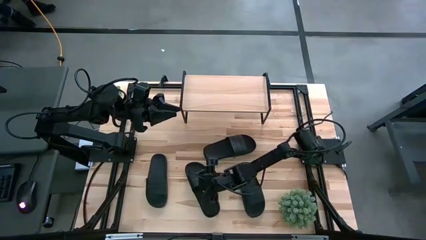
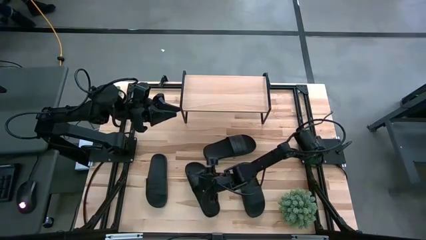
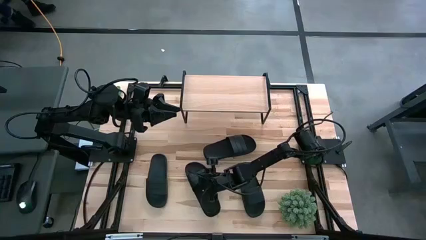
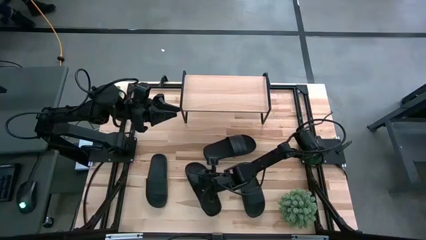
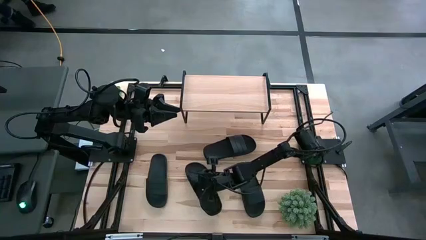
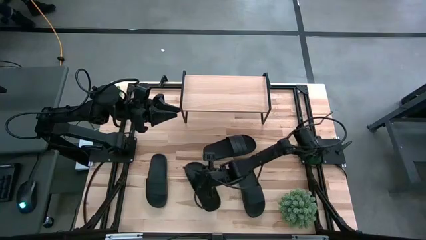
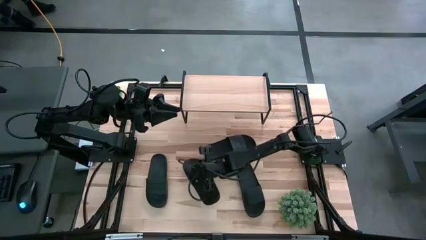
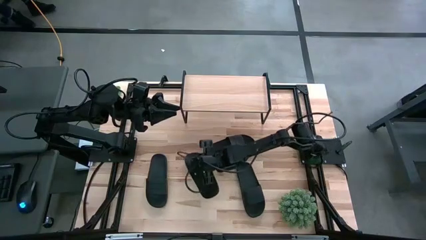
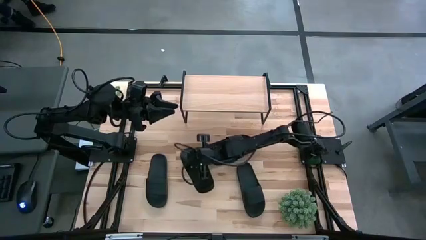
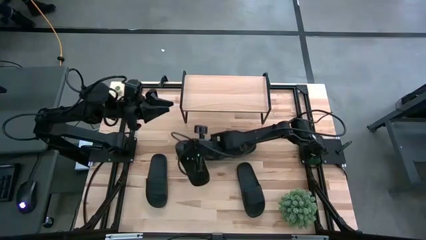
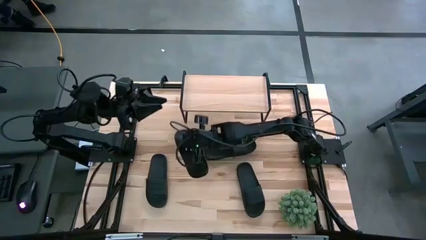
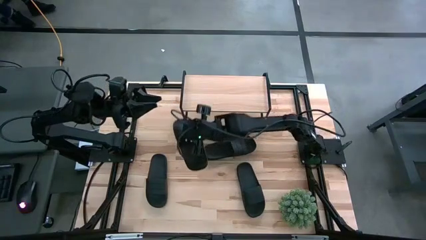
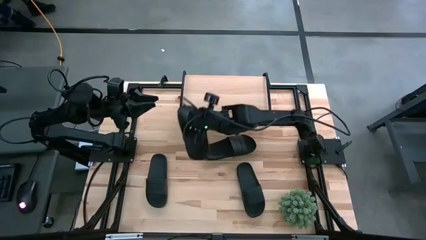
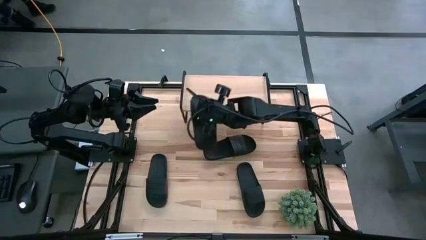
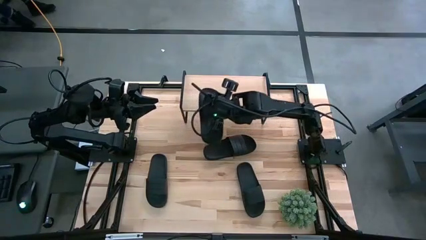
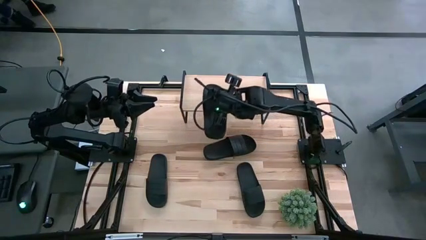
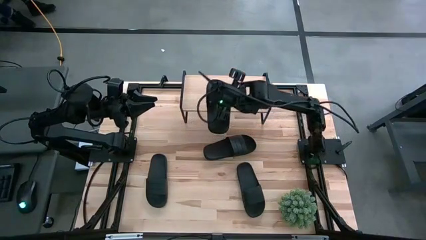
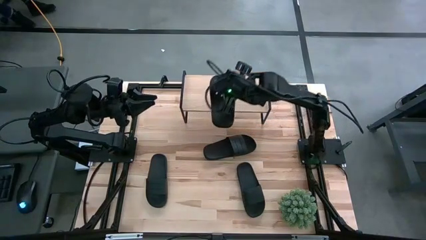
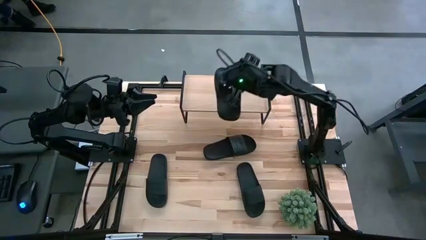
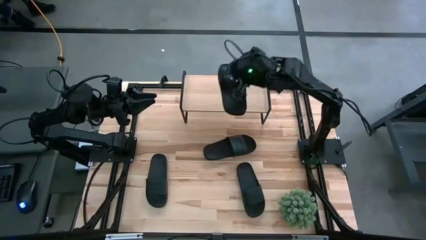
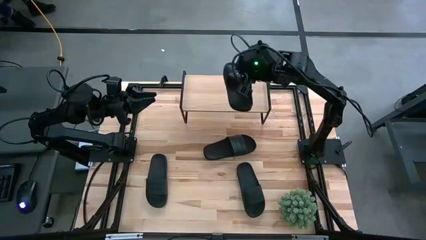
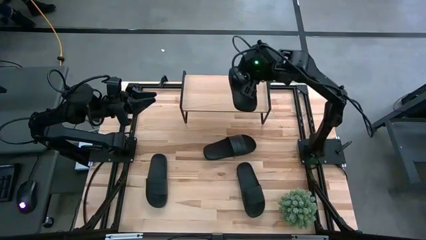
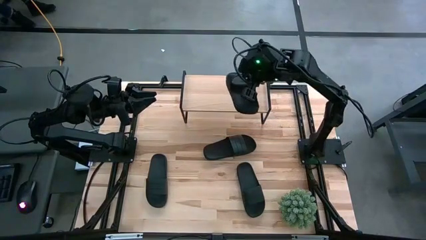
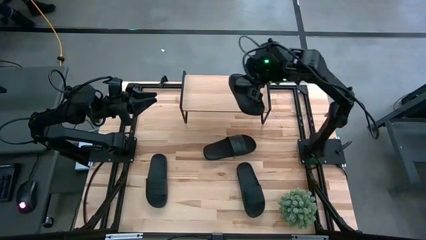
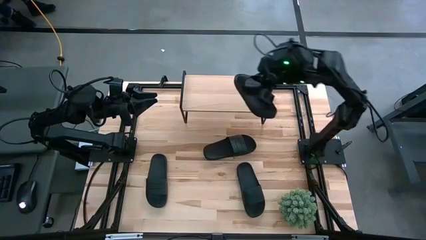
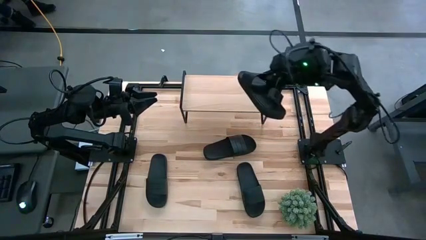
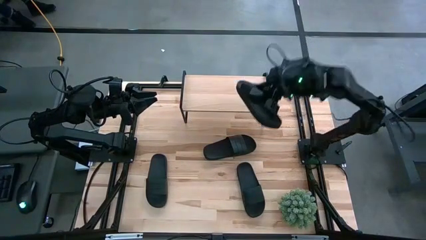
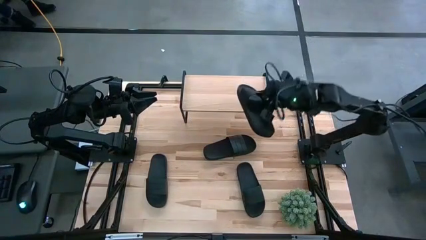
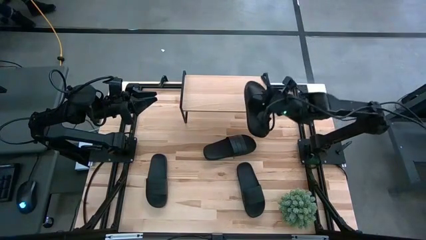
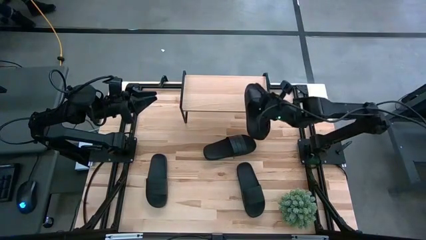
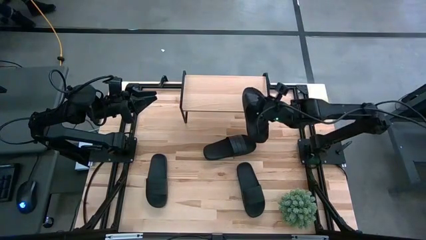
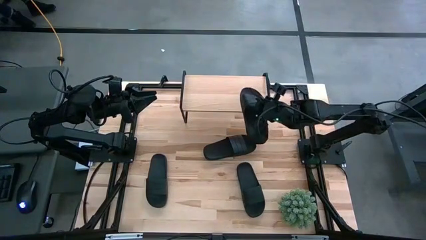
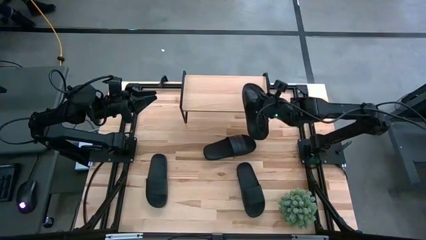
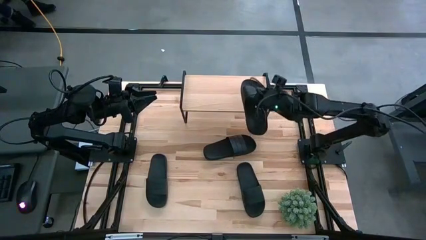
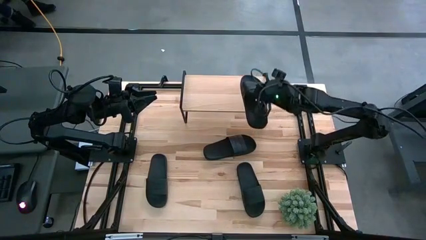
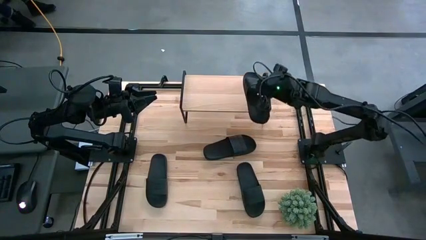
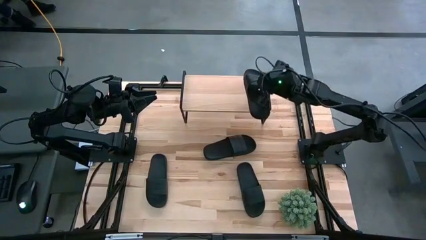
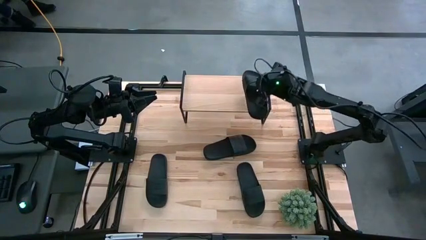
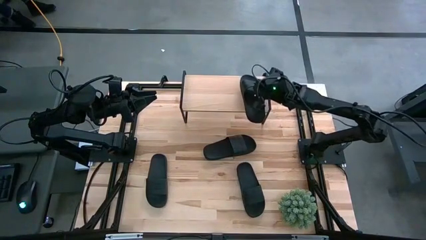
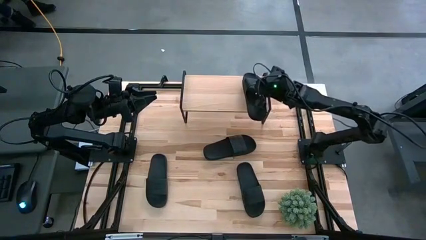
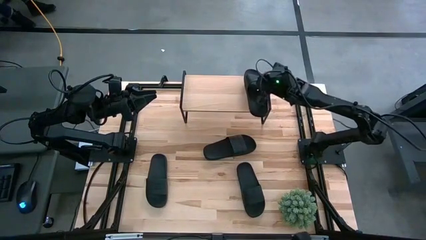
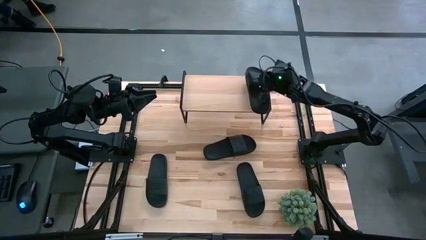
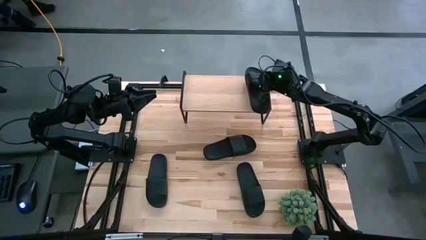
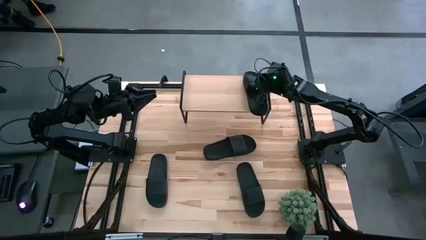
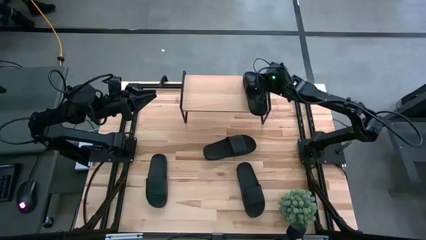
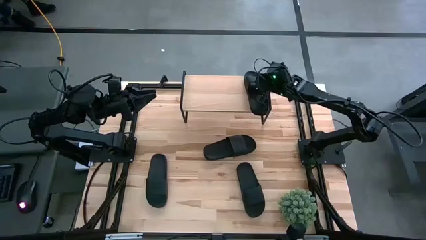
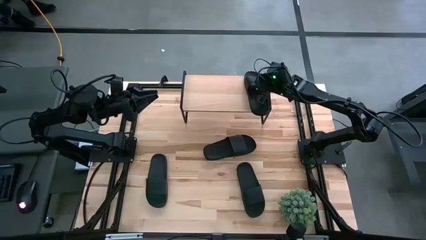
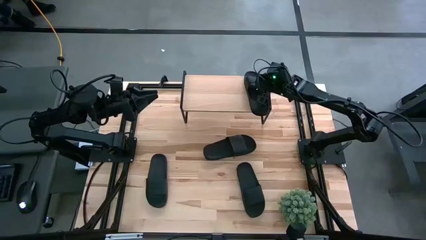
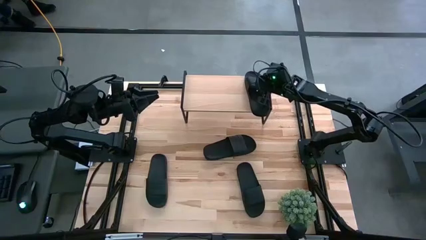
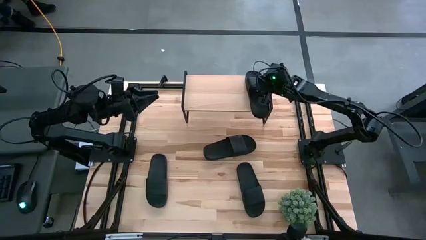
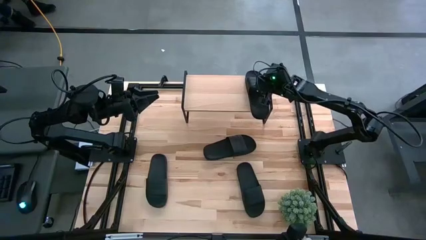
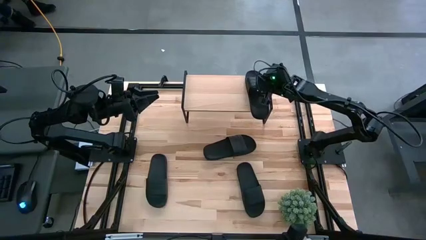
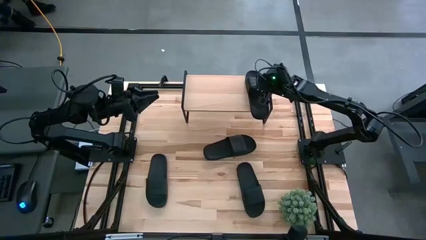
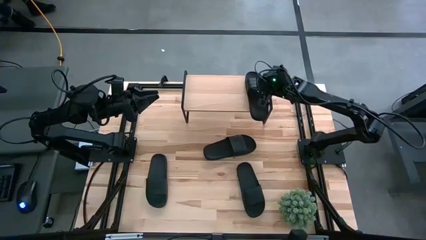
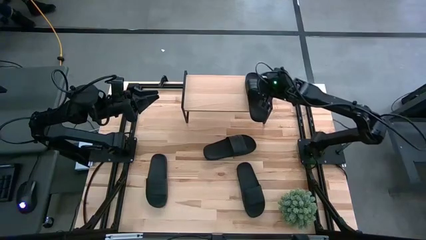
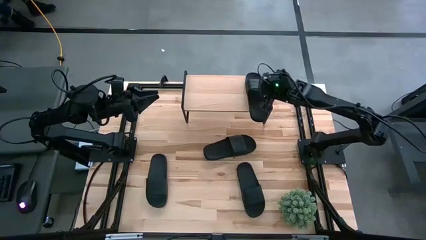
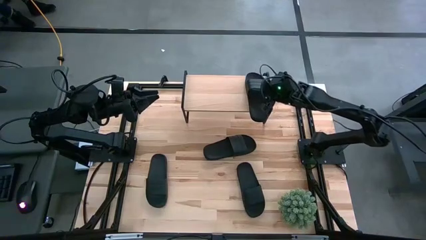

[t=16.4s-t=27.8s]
Task: Pick and place slides into the shelf
Put the black slide on the shelf
